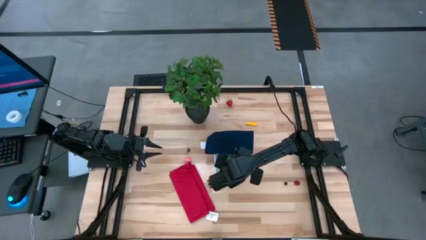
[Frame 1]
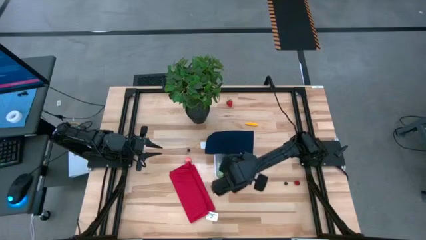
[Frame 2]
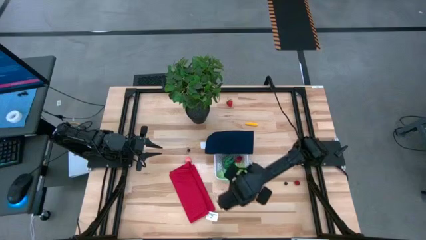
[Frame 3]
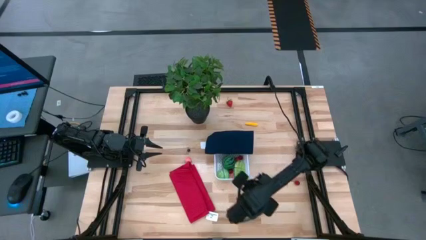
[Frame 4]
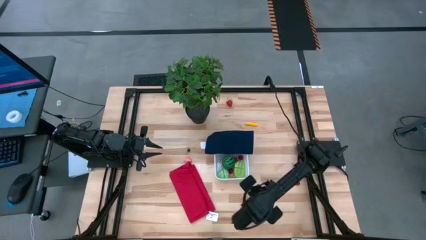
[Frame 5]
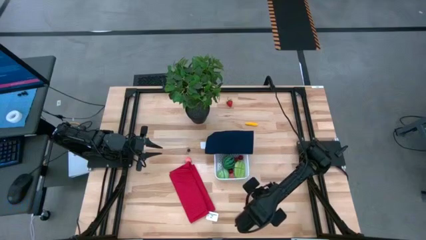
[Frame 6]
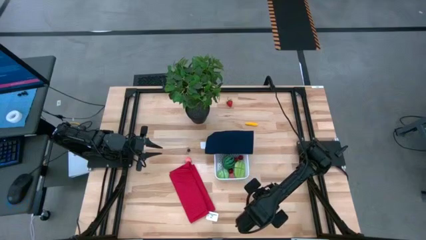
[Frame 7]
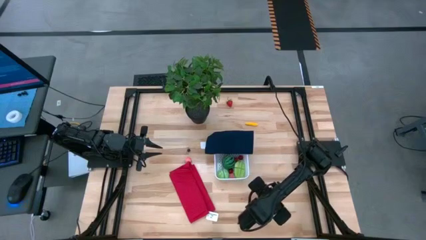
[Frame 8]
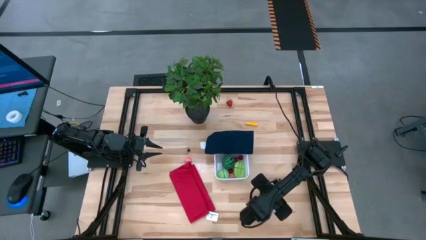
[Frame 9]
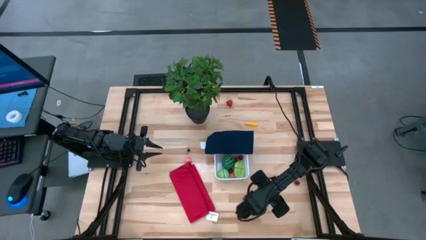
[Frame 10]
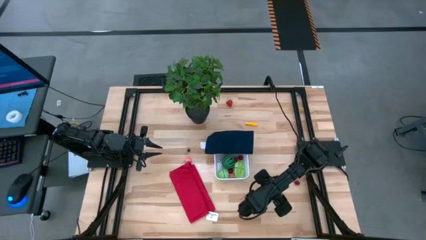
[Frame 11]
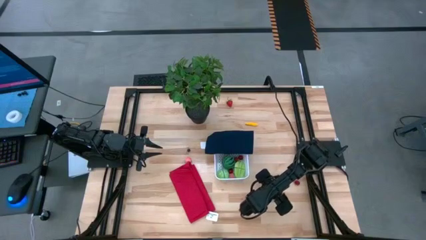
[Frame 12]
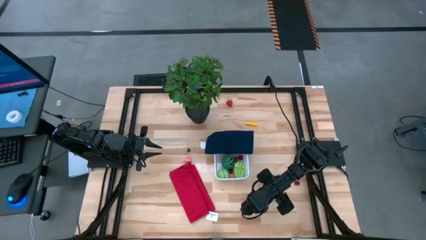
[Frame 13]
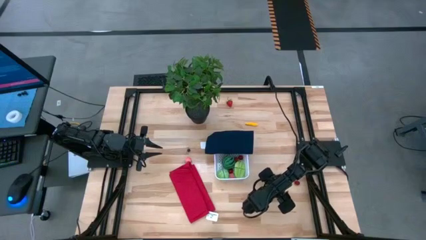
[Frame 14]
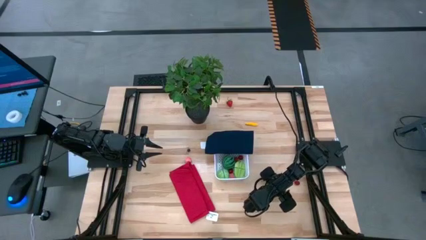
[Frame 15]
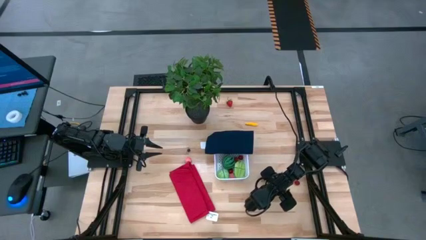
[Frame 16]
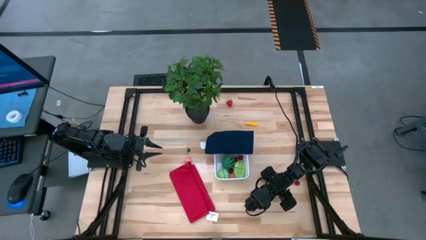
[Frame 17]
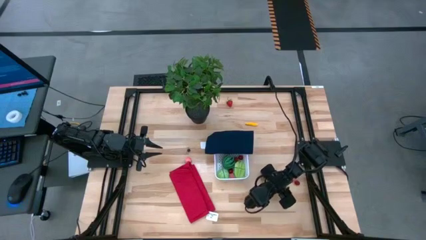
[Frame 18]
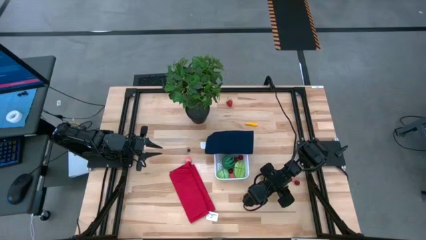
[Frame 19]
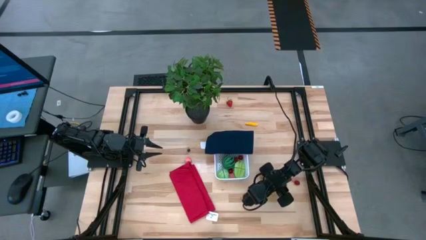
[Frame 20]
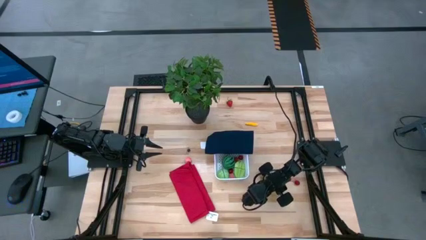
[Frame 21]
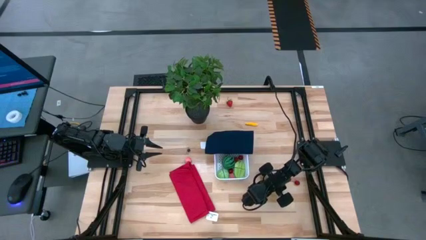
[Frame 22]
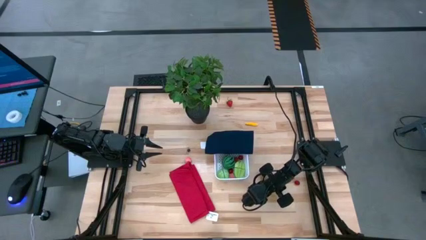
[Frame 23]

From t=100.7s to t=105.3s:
Task: Pick and placing Produce into tupperware
Put the right blueberry into the bin

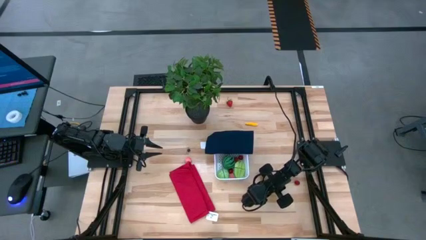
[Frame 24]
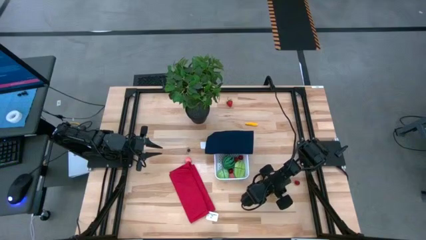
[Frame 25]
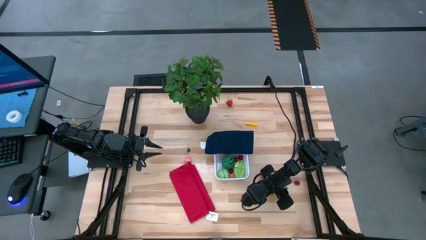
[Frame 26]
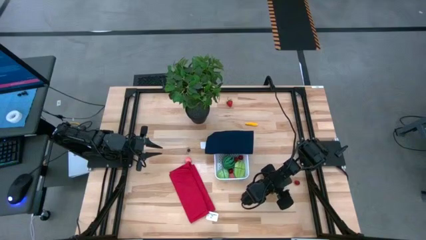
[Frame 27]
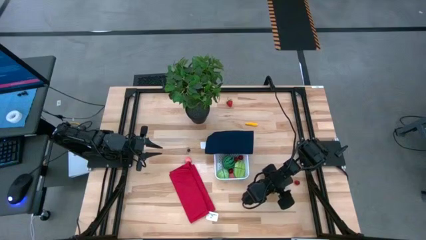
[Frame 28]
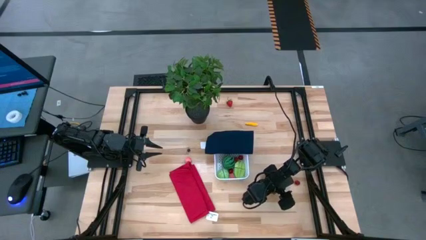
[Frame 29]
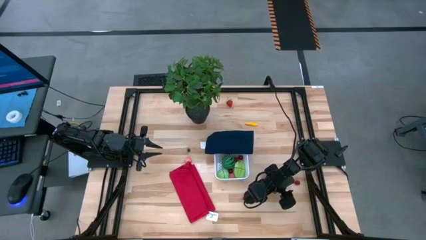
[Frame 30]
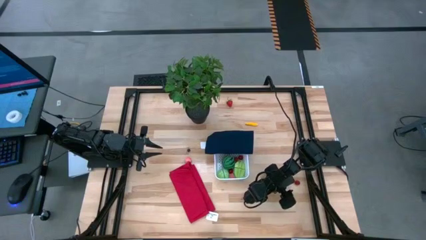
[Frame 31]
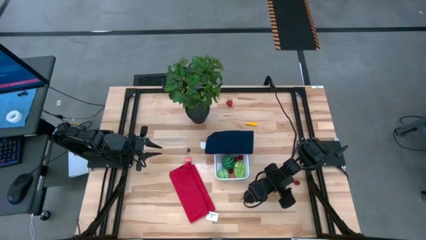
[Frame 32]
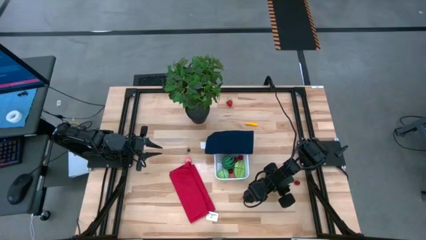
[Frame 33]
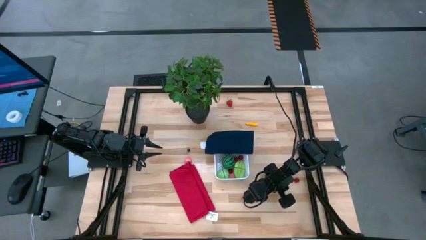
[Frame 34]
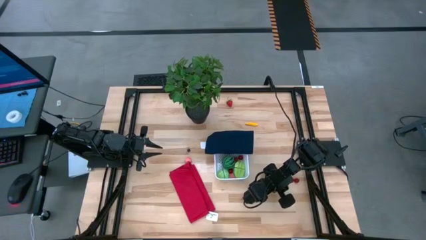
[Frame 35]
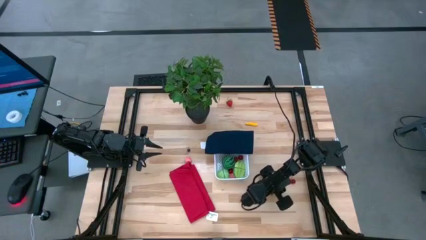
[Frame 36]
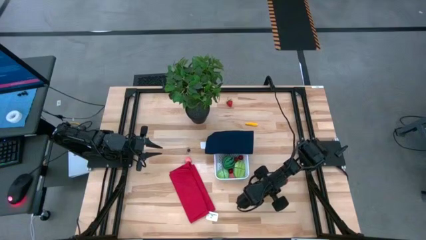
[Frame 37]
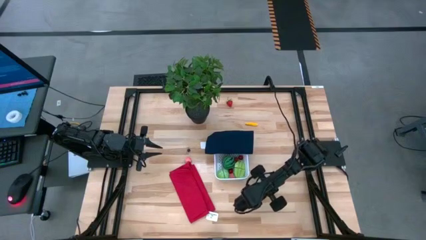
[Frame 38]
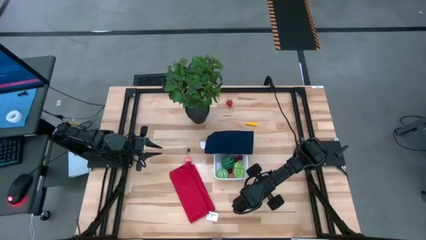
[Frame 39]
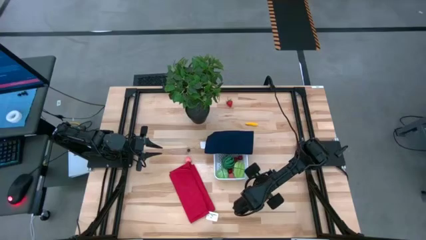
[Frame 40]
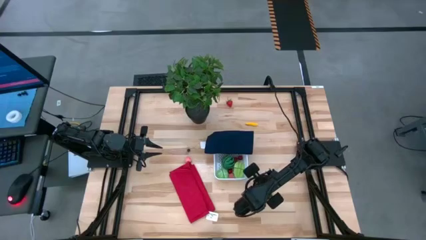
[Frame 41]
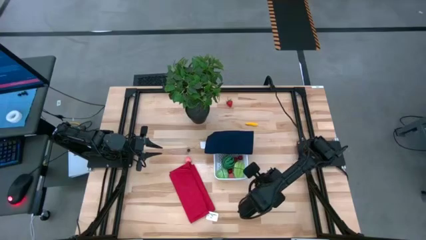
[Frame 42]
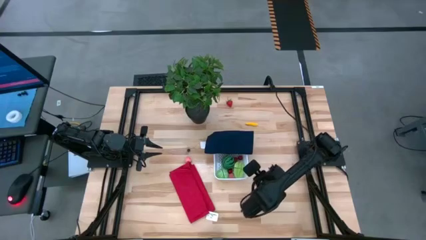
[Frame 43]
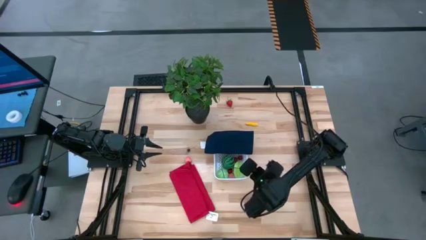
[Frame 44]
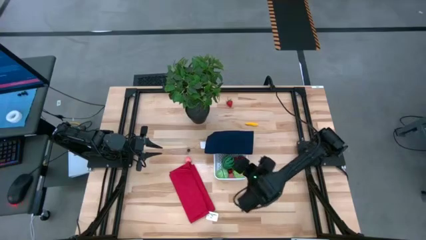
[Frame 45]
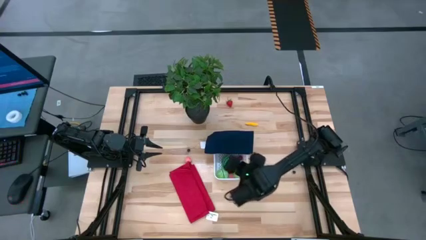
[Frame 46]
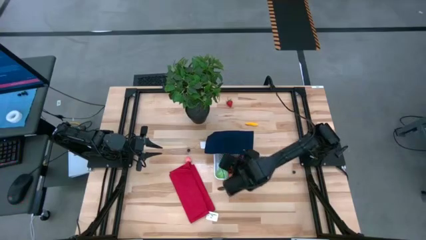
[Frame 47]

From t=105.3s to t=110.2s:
Put the cherry into the bin

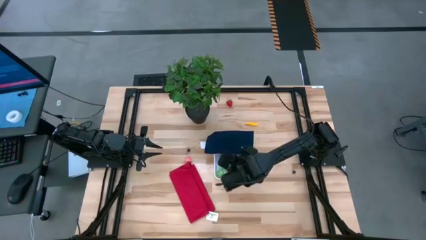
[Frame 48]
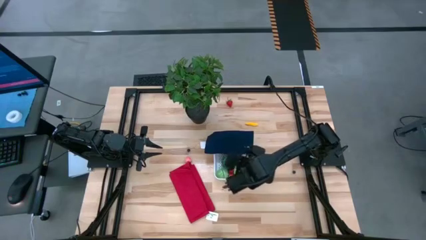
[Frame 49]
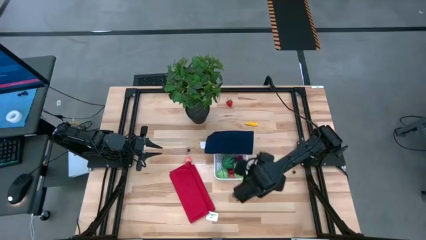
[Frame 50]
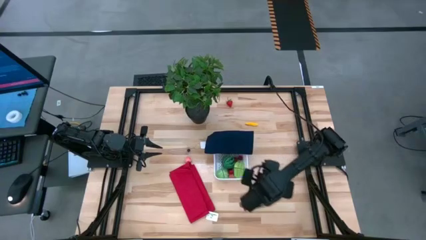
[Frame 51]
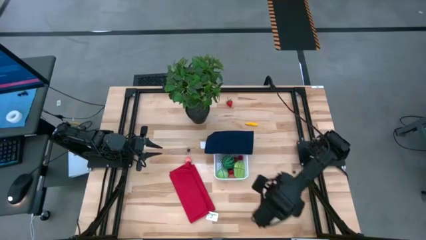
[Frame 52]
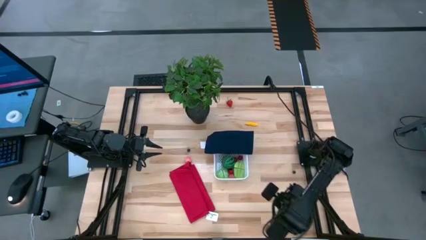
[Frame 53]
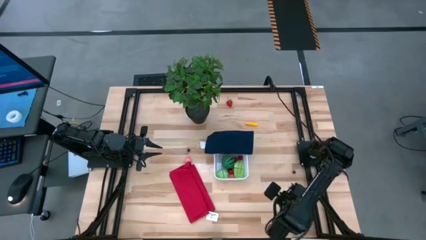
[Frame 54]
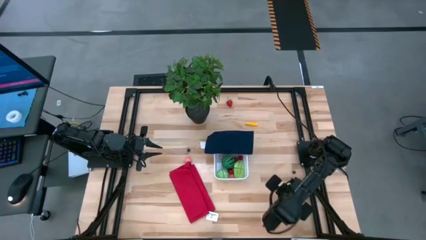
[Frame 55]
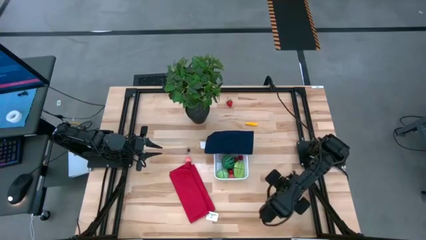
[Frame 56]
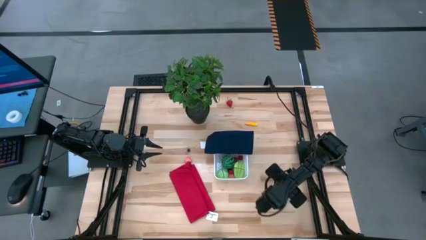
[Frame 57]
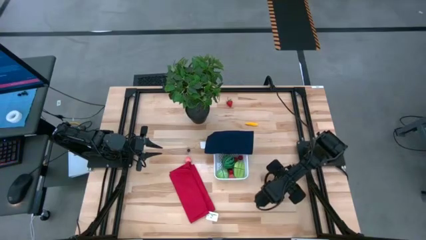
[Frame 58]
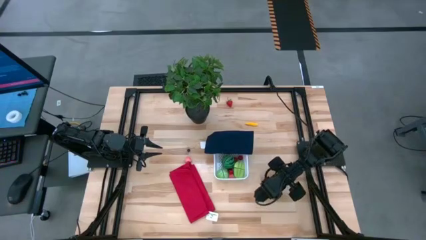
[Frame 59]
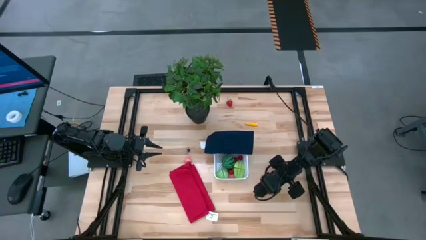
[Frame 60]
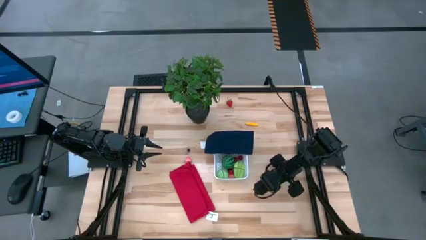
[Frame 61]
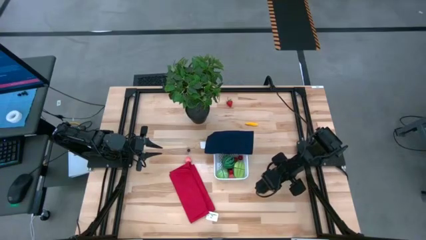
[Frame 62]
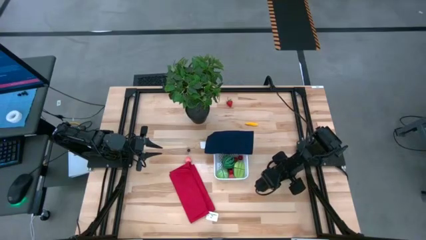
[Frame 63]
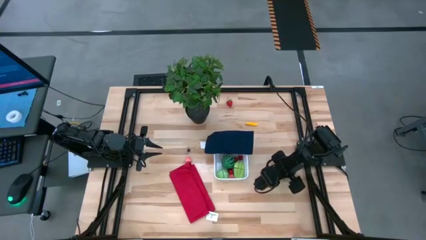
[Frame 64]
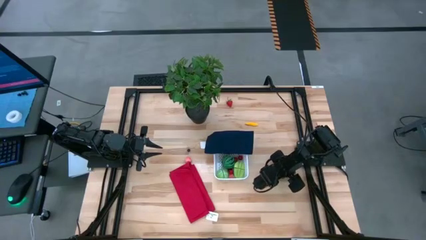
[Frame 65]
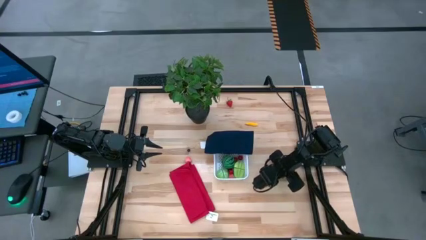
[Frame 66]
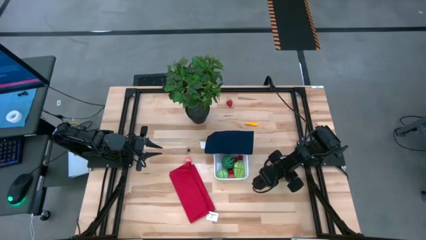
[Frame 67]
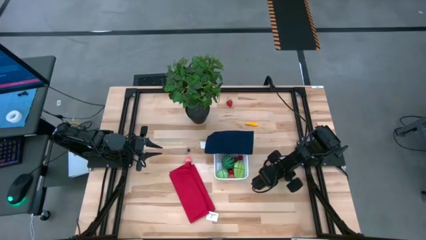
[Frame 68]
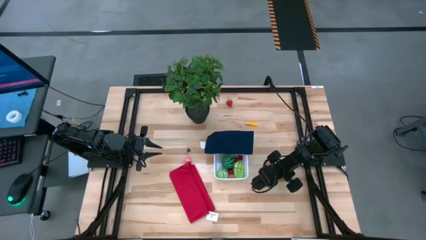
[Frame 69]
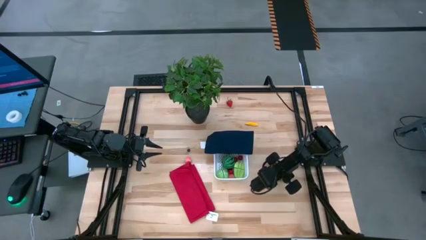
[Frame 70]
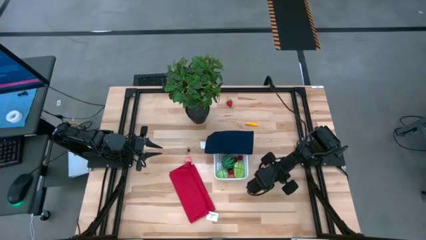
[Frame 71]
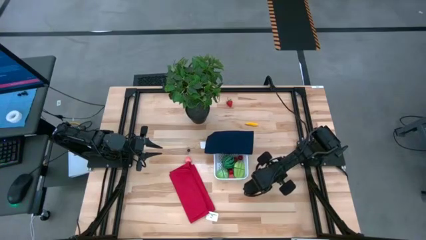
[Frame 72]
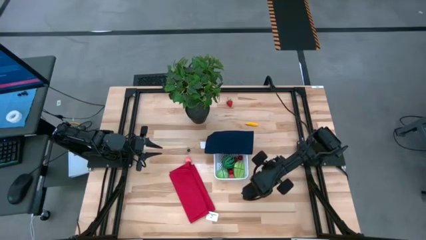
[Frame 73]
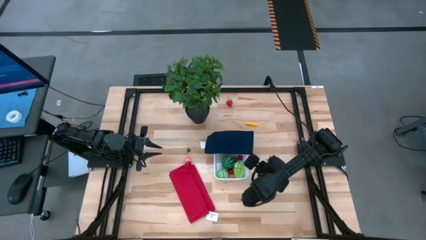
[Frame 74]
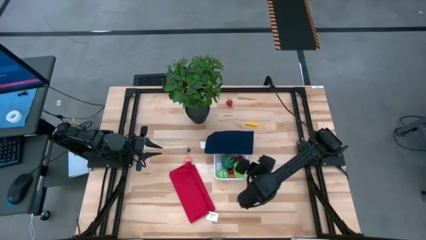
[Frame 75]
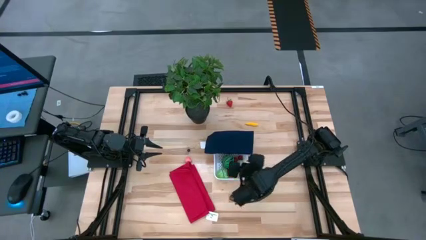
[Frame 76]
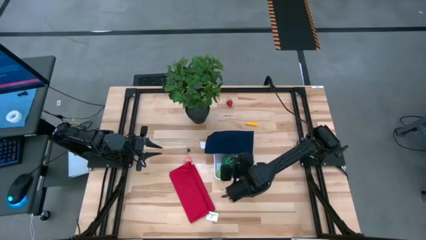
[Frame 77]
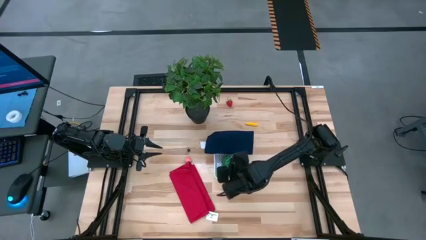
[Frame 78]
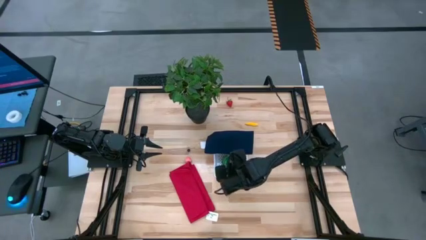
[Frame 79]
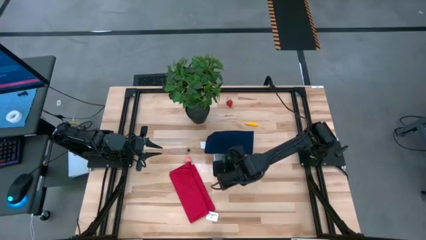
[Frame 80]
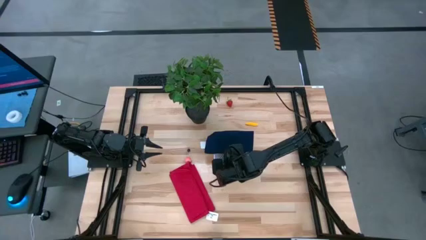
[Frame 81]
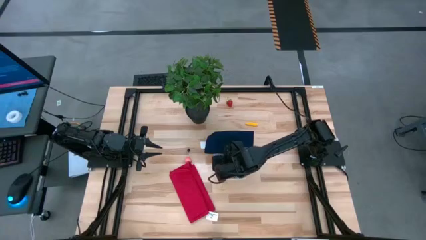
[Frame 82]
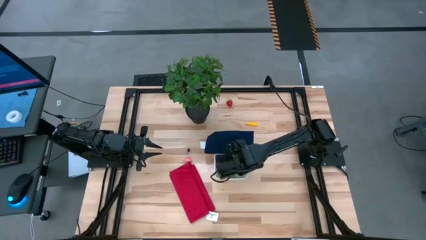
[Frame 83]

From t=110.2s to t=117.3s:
Put the right blueberry into the bin
